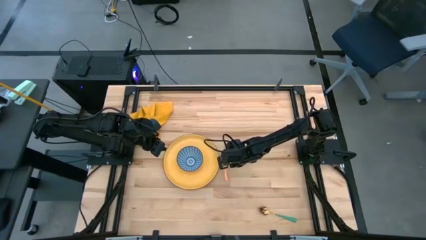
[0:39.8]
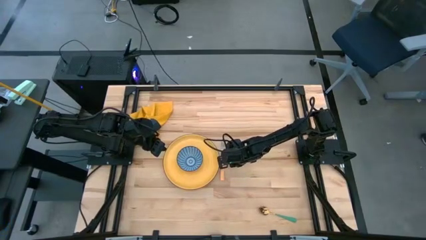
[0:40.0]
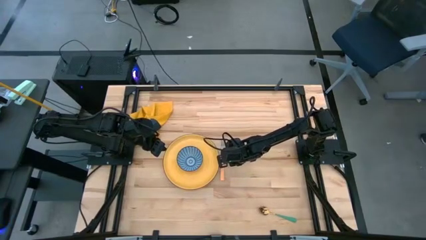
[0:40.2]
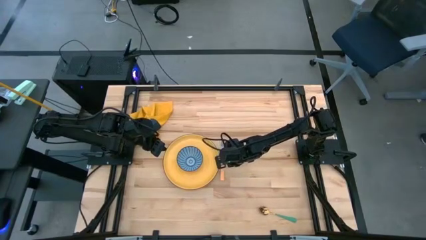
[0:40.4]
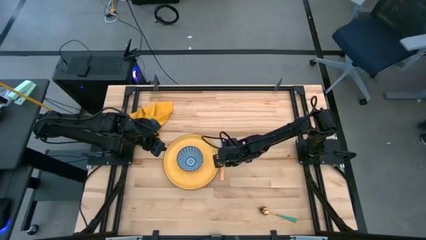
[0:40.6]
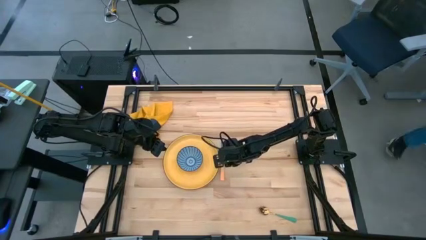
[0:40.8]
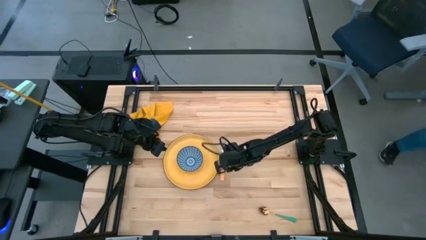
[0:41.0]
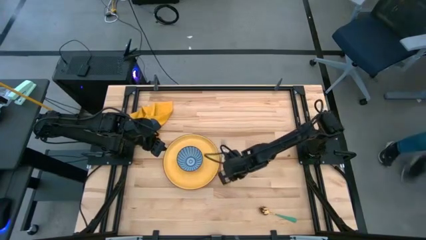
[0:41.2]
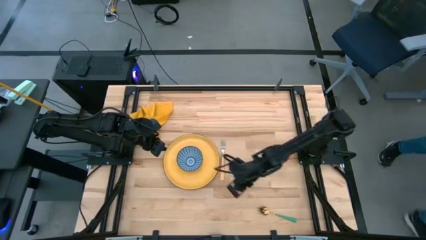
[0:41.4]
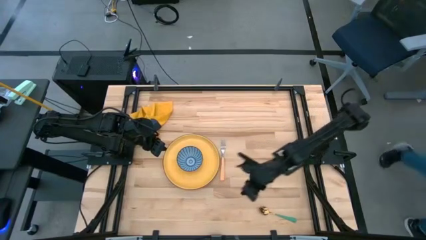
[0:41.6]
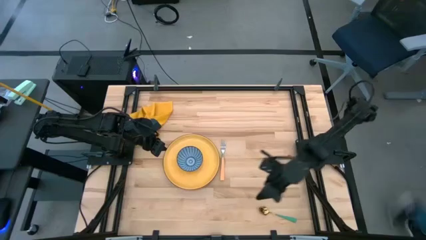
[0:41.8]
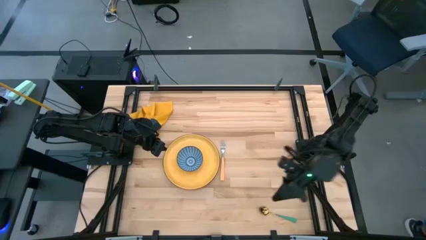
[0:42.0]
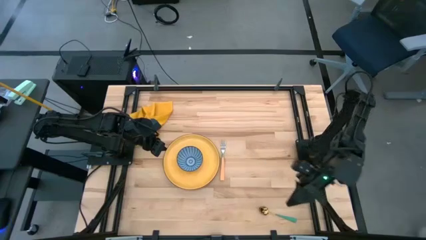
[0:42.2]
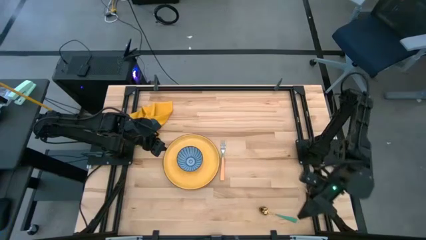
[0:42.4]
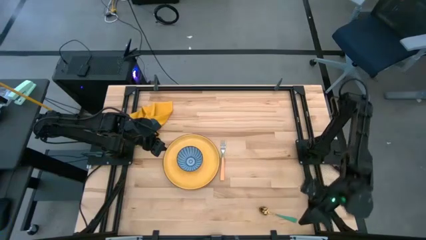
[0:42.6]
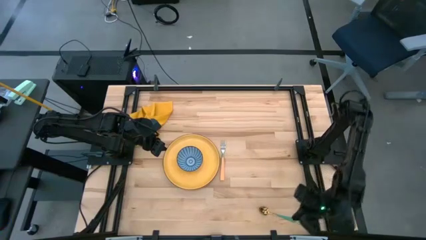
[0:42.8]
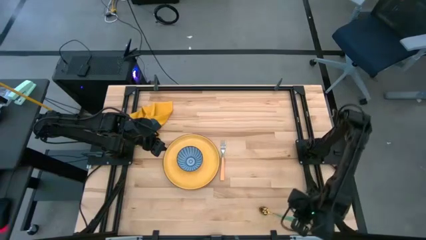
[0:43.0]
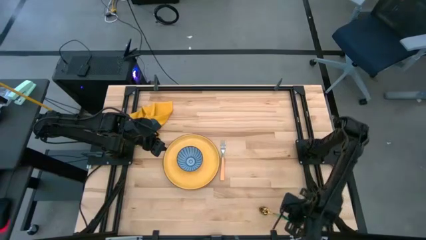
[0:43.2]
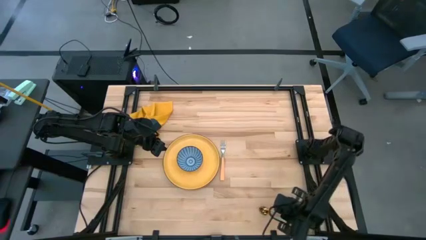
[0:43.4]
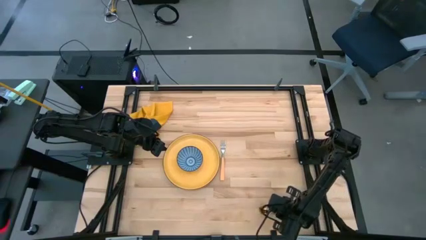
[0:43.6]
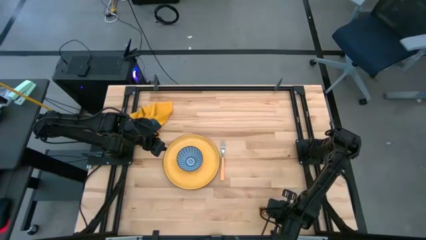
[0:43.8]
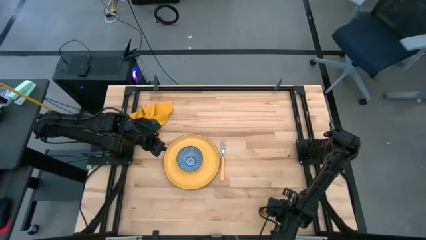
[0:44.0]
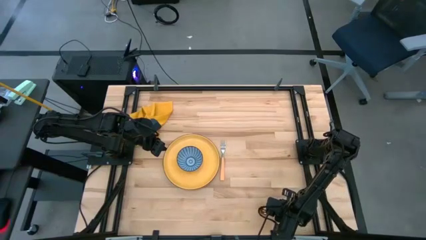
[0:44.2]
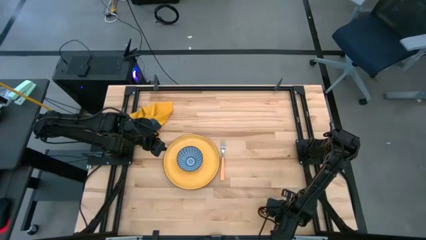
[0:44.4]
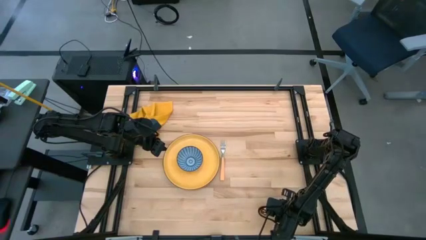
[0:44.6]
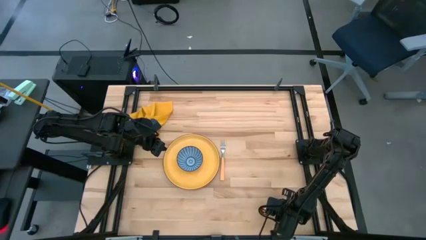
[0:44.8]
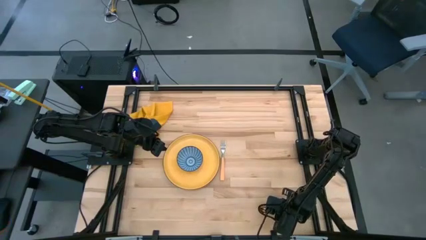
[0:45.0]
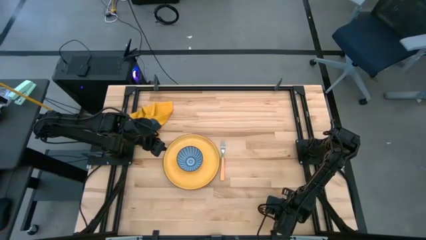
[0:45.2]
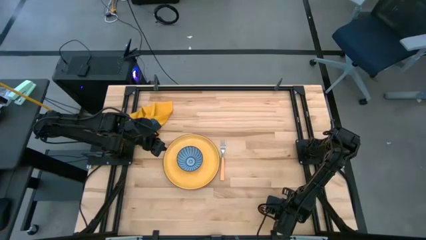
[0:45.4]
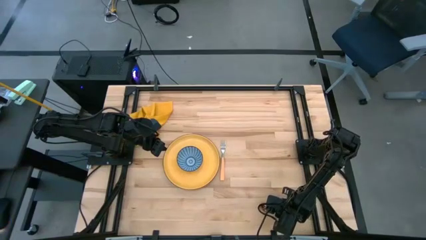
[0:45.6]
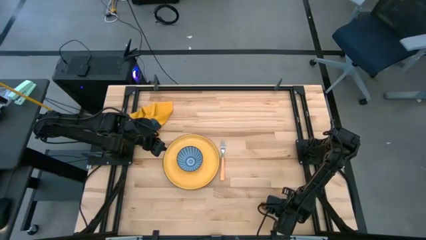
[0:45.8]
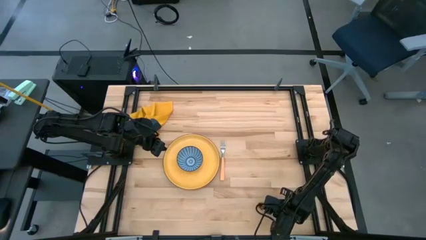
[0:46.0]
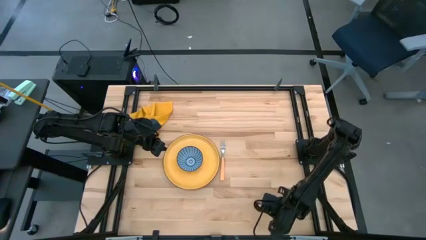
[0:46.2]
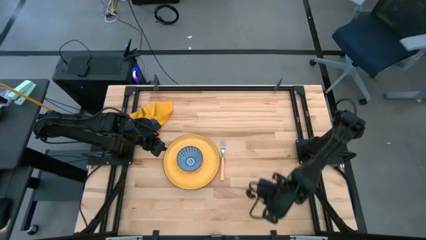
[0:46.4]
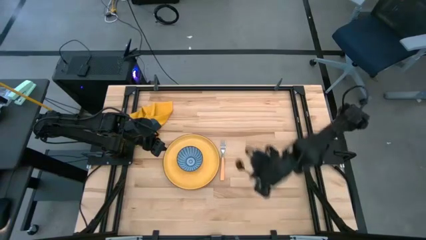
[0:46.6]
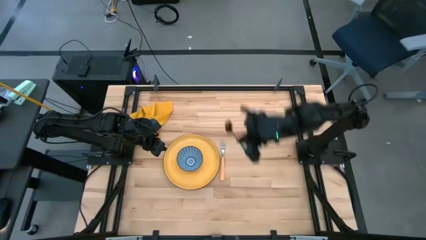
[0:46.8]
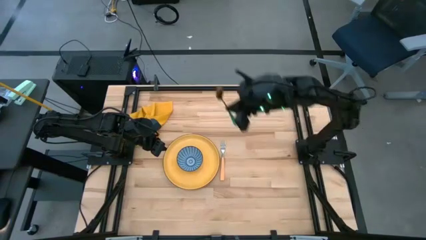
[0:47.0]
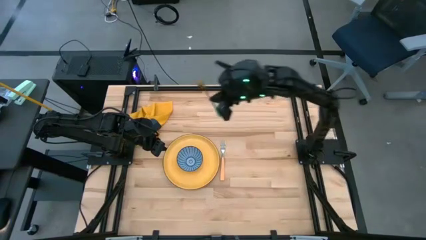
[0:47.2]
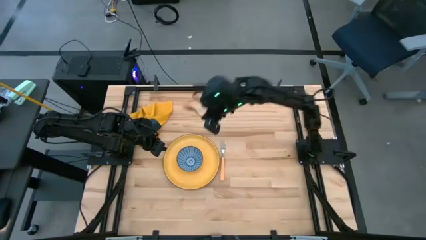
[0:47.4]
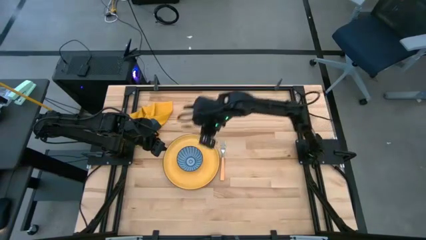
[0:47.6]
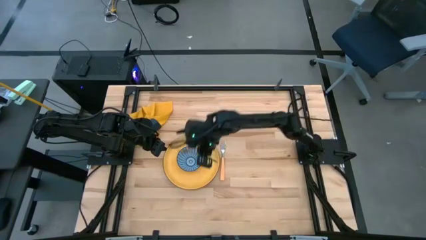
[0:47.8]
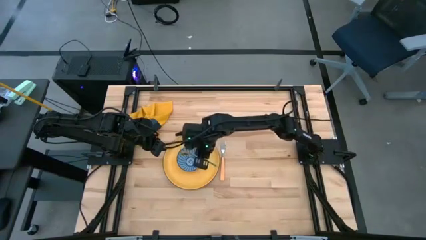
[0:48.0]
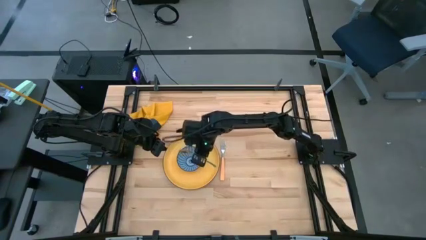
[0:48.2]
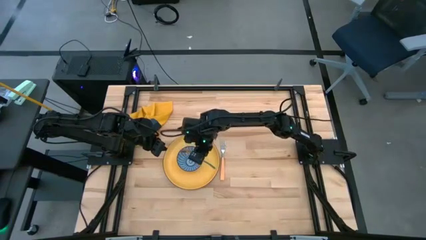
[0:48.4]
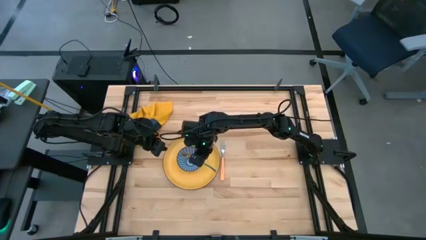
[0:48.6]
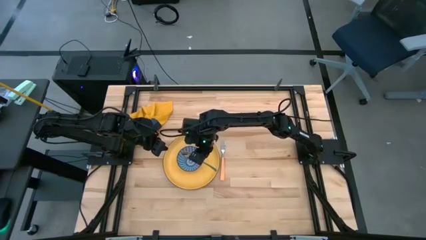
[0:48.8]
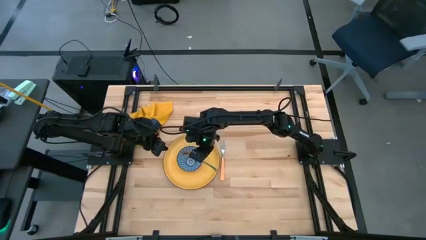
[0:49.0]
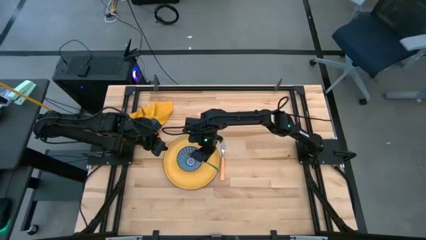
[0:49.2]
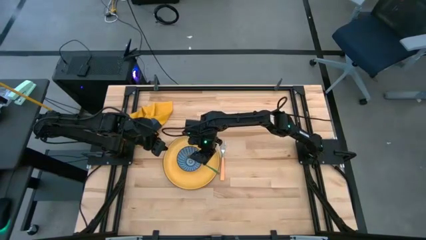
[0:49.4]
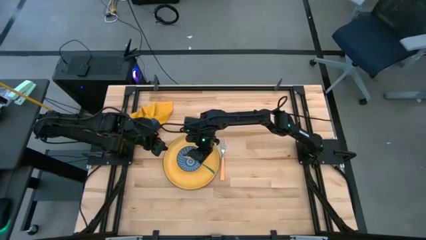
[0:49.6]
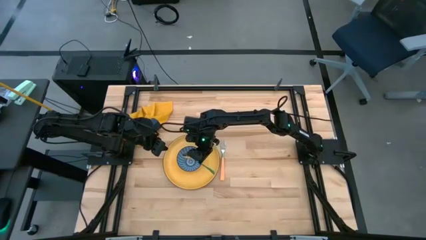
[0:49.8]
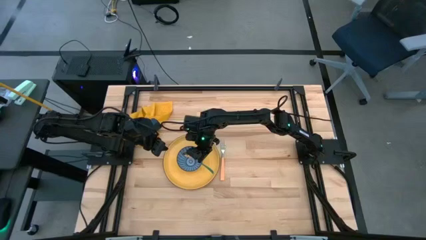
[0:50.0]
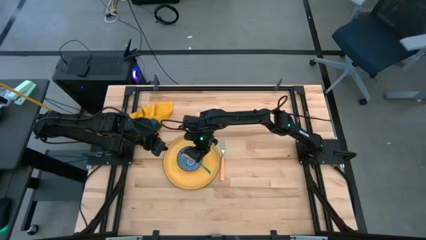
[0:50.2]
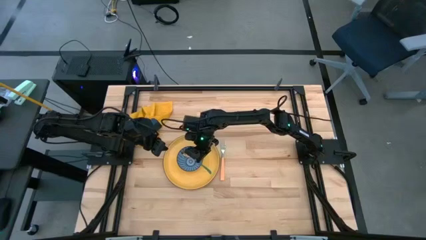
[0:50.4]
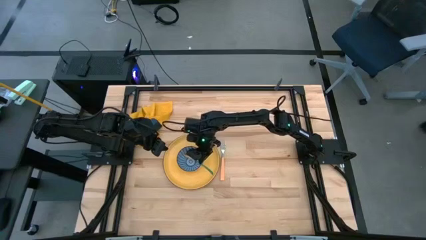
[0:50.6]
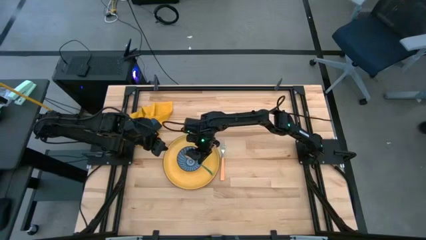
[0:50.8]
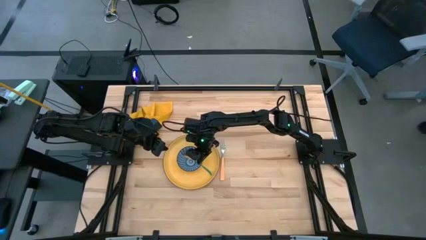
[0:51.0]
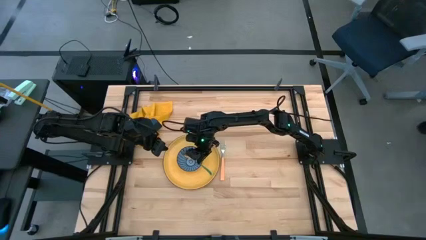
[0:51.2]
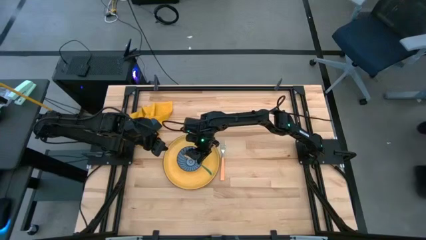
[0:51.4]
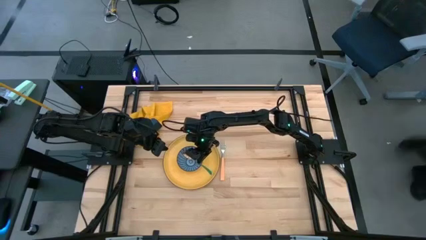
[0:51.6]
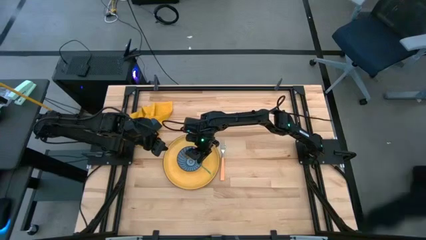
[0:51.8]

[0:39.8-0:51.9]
Task: Set table place
Put the green spoon into the blue-patterned bowl
